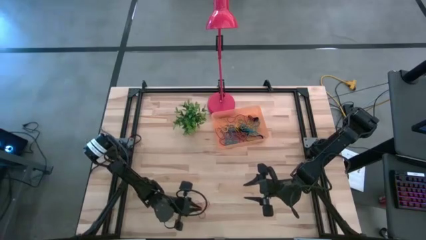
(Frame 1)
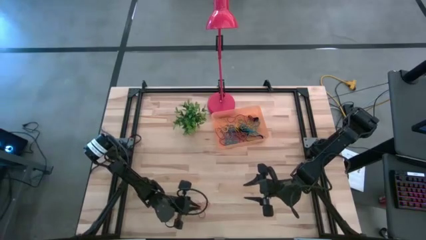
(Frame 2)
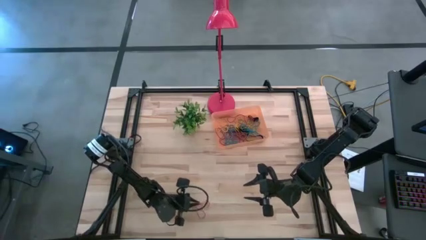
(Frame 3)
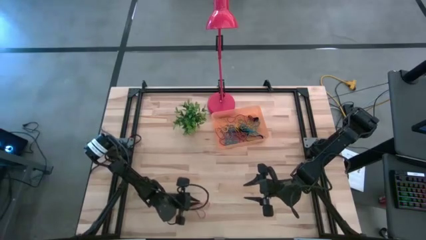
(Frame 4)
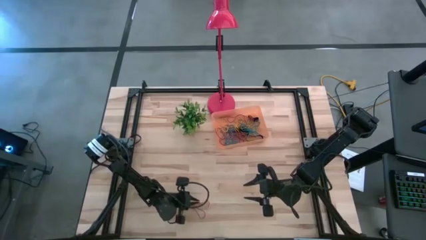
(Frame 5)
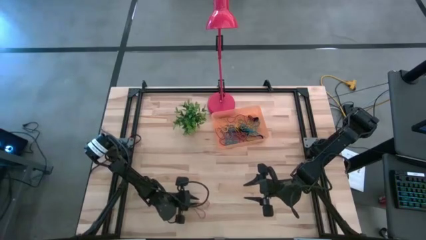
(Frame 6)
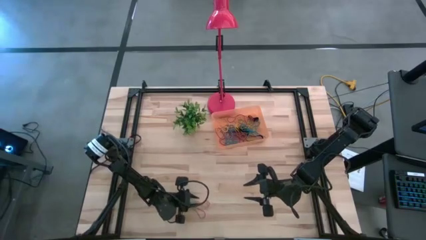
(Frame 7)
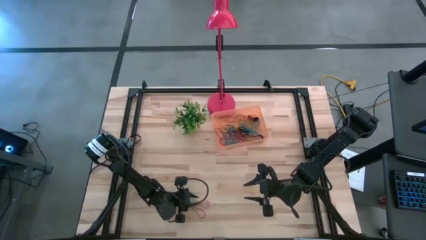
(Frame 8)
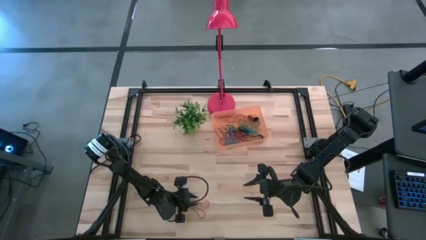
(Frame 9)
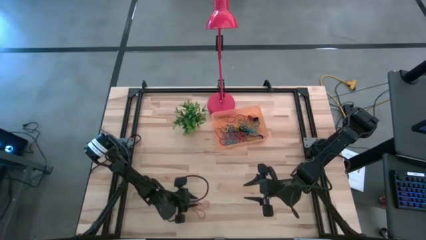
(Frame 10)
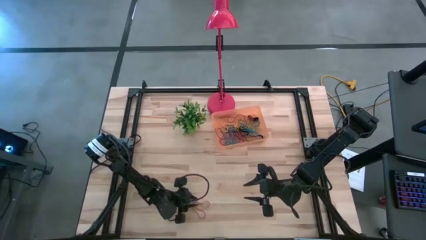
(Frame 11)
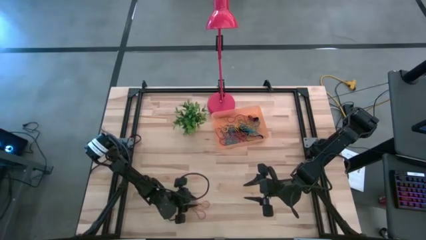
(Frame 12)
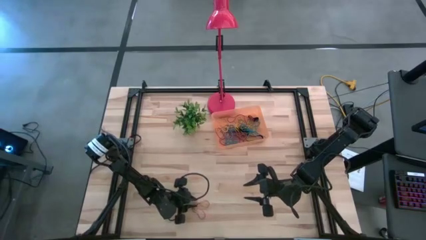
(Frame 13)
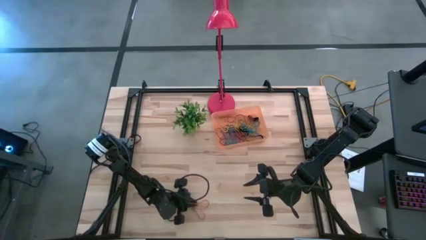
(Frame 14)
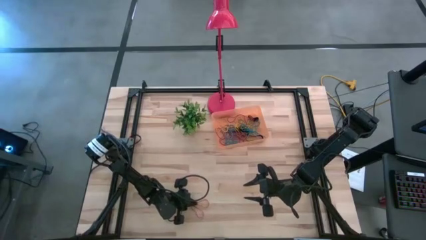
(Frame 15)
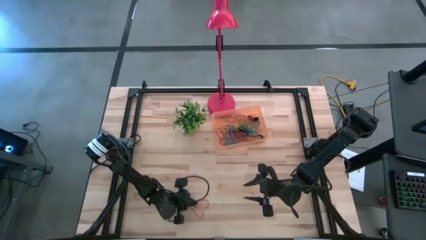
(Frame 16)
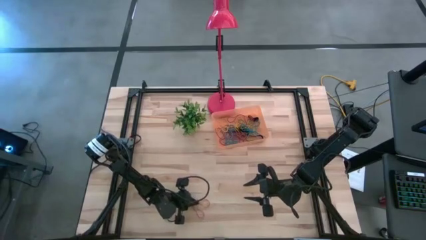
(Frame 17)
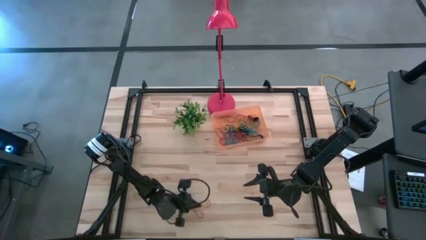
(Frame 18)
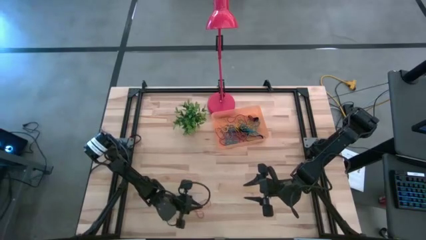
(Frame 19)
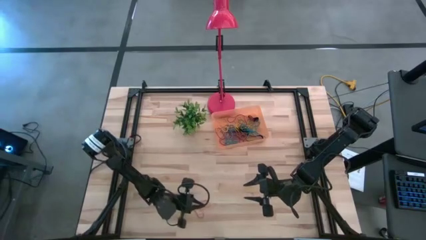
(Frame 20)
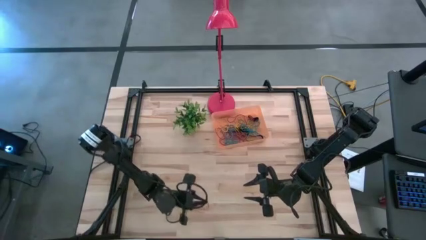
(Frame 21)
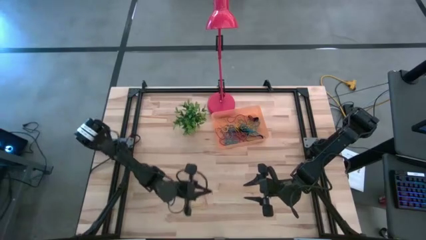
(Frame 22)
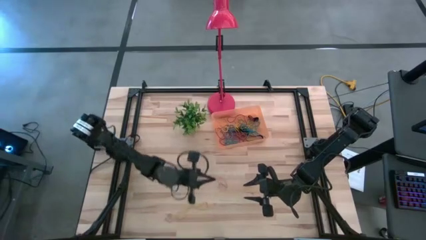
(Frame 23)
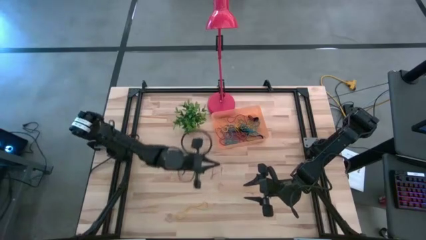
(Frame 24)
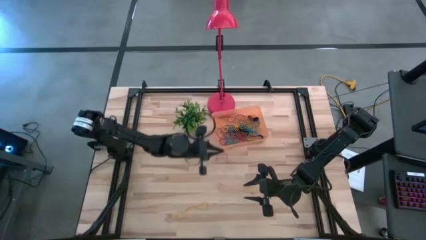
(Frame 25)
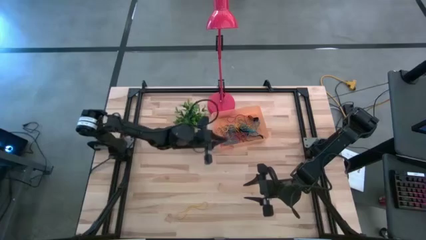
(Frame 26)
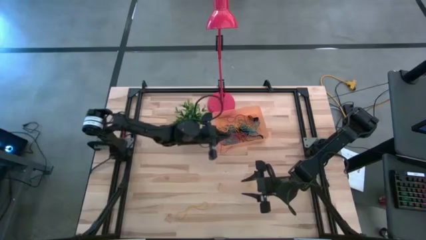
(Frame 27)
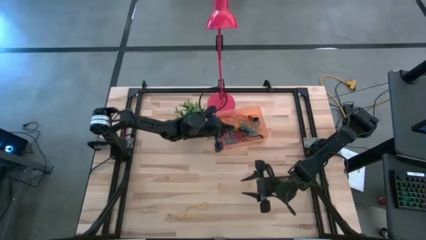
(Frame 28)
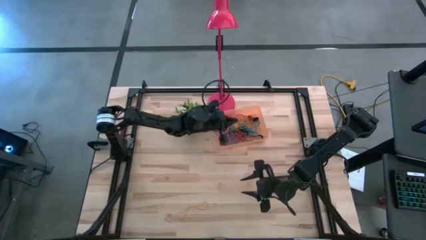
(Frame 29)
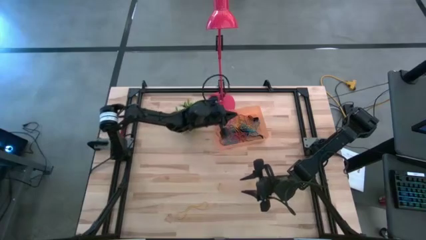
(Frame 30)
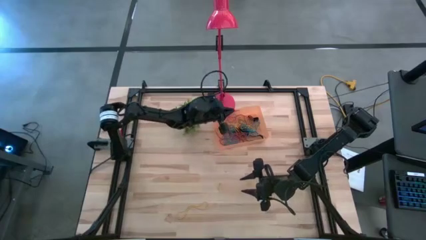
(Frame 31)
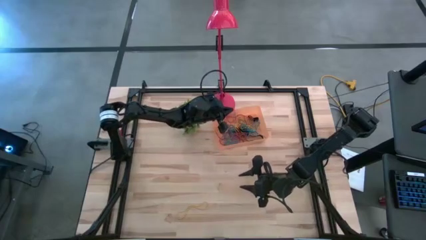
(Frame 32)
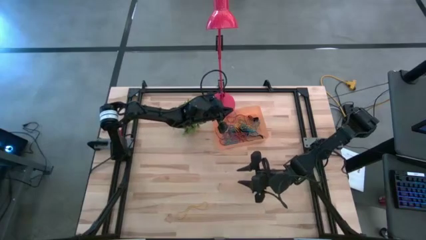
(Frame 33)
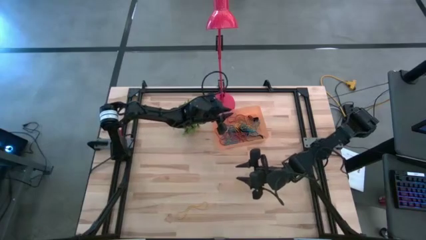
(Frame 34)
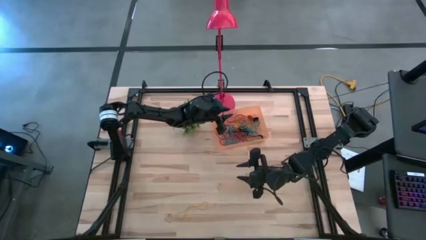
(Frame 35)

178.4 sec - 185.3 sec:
Task: Pick and place rubber bands into bin
Put the red rubberband into the orange container

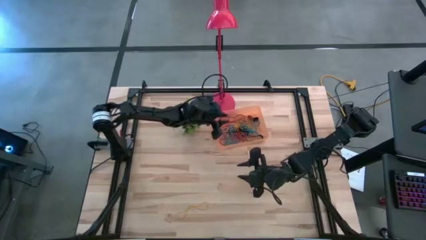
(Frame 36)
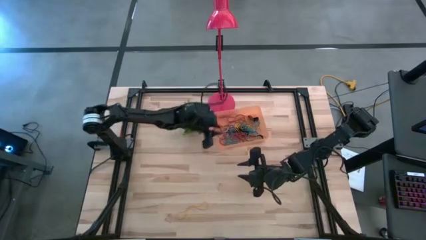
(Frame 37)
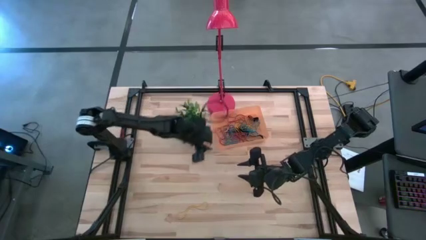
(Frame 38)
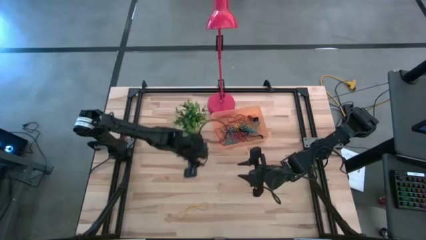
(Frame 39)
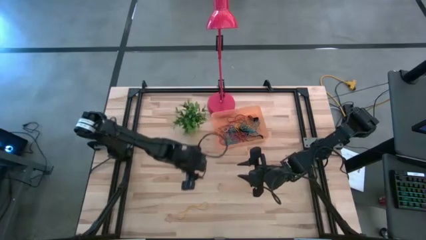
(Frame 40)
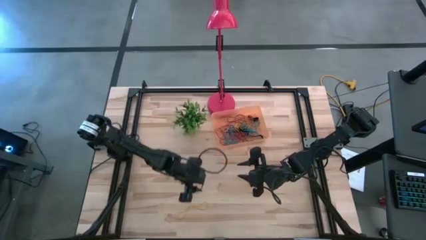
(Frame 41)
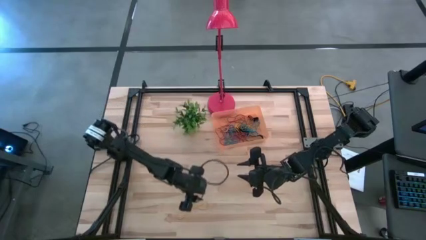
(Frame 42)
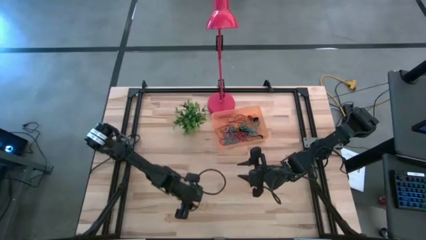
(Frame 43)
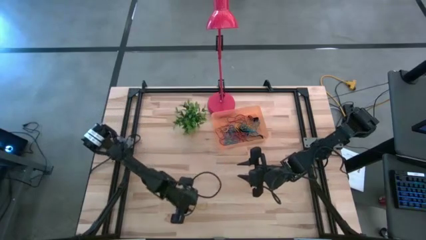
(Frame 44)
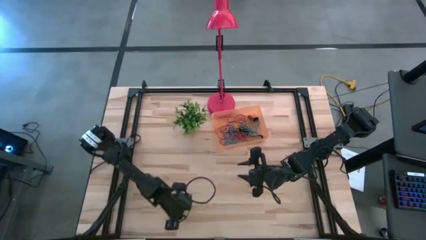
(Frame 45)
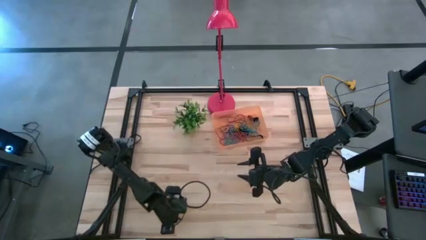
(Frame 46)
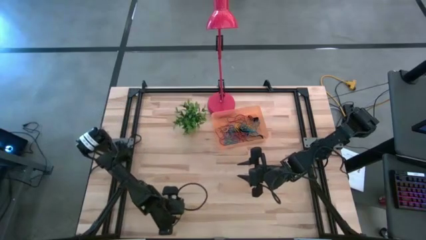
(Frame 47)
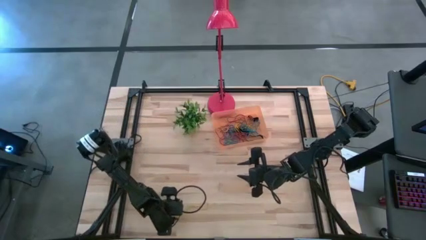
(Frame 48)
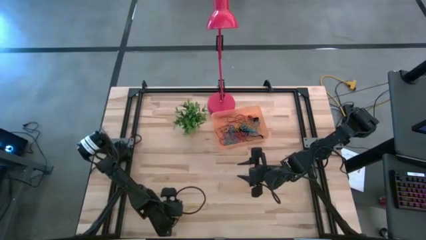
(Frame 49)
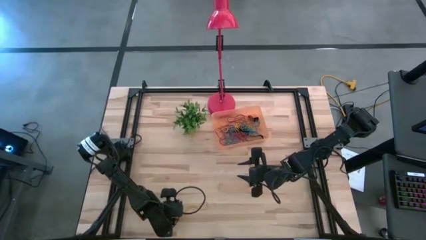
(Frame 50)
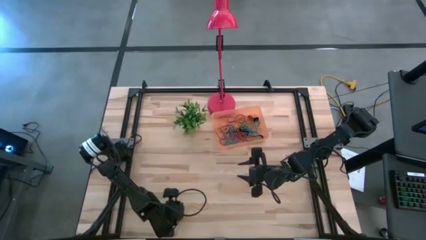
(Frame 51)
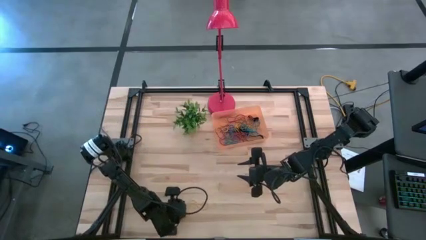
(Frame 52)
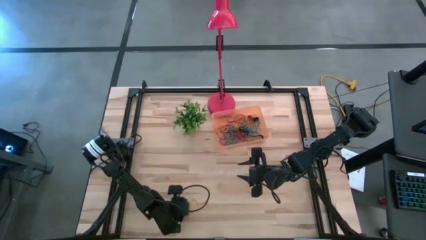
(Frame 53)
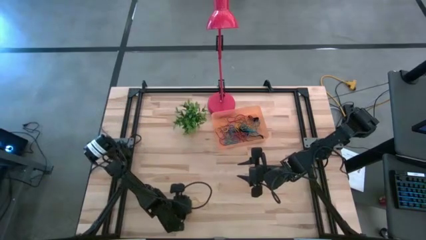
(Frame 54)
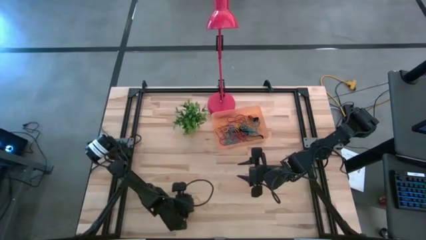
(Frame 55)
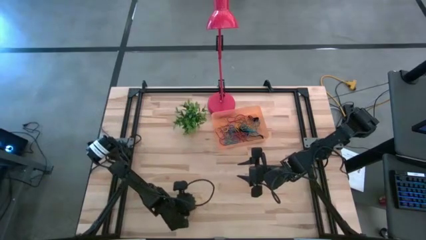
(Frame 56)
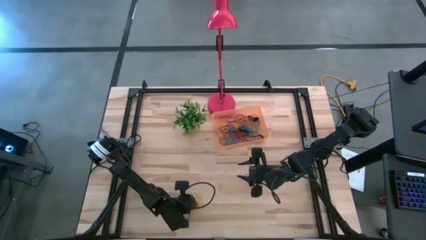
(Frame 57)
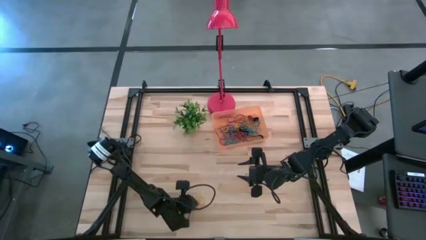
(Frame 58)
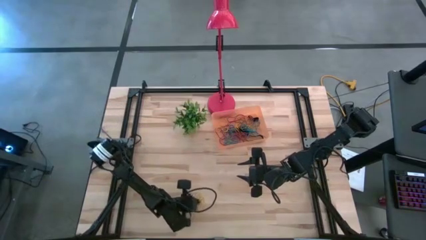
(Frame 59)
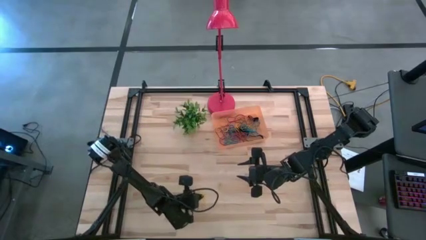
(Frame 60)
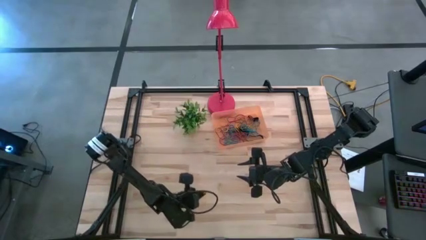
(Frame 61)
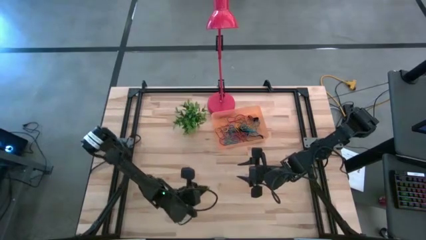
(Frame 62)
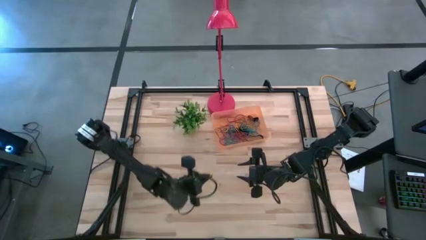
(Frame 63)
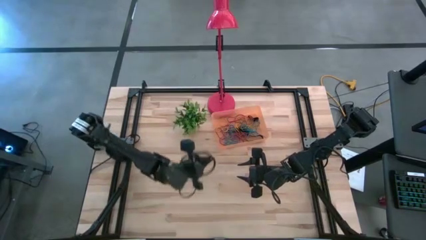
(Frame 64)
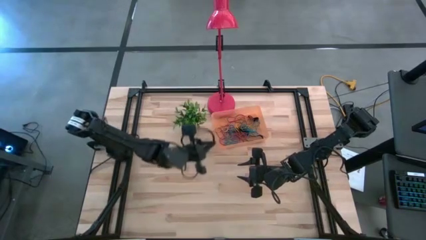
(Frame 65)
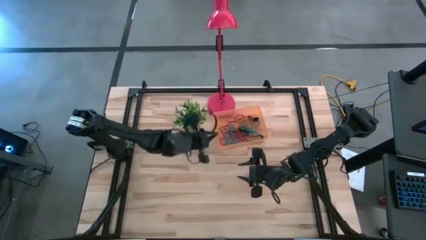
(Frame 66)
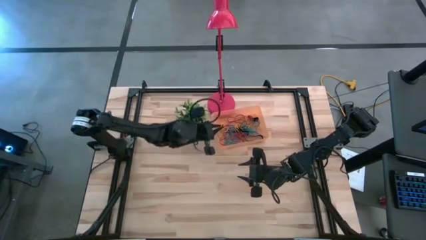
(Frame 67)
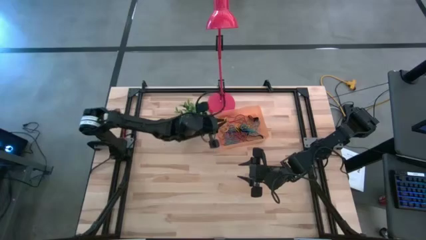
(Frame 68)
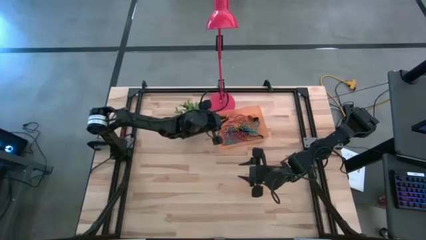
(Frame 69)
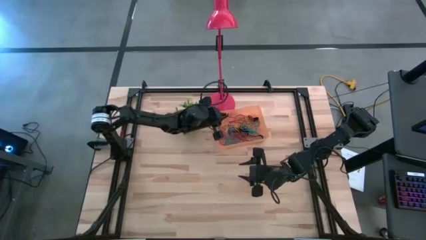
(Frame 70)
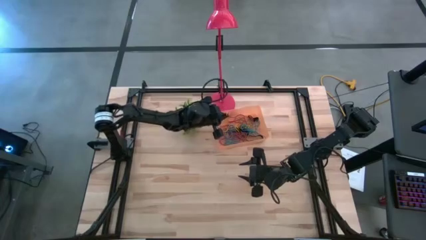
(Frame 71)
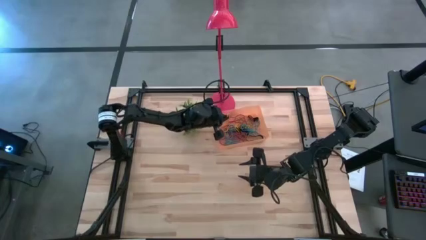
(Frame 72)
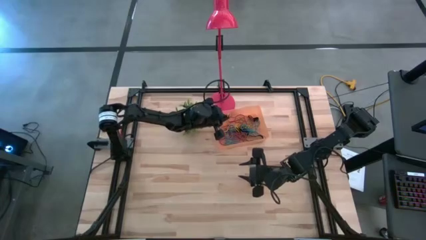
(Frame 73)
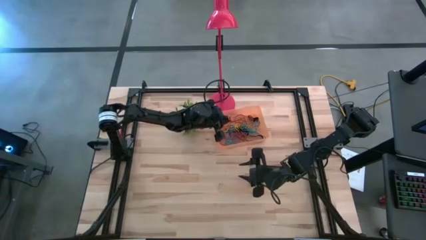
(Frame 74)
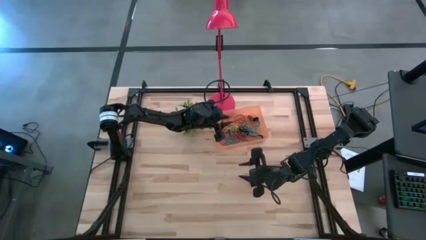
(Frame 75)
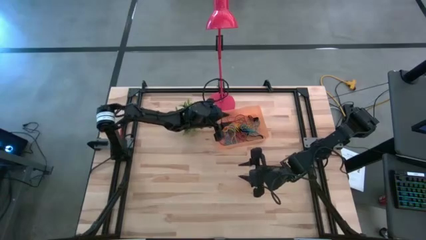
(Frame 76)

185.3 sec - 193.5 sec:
Put the yellow rubberband into the orange container
